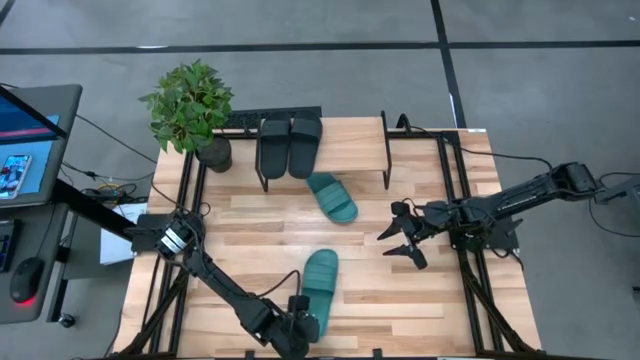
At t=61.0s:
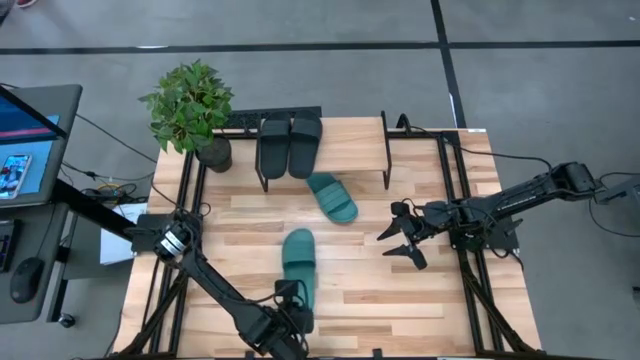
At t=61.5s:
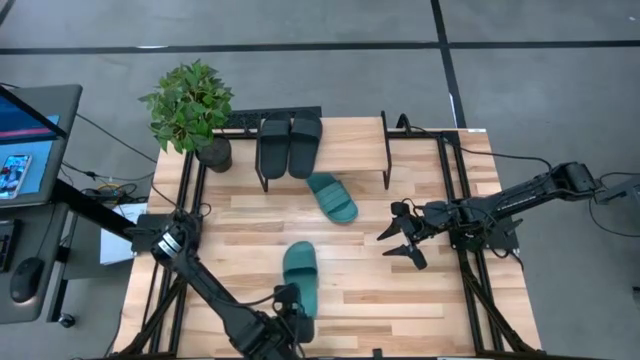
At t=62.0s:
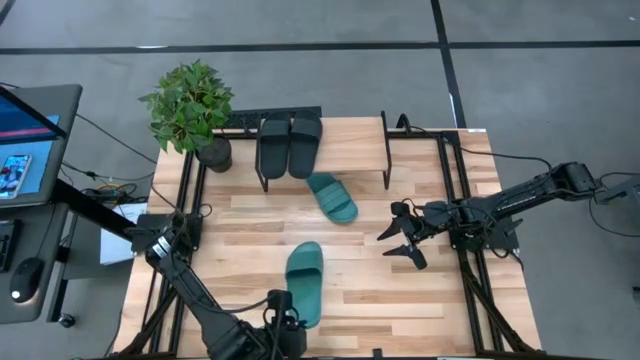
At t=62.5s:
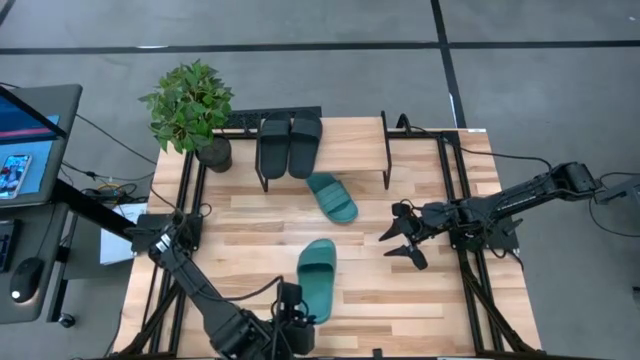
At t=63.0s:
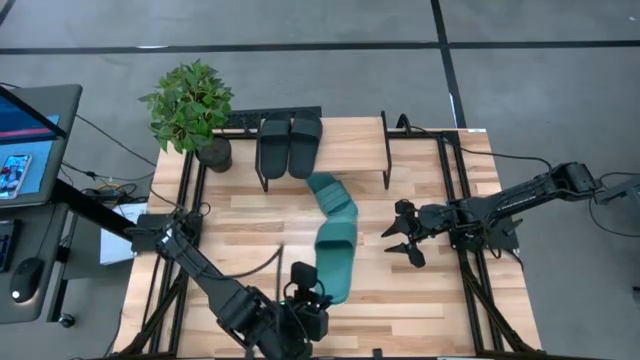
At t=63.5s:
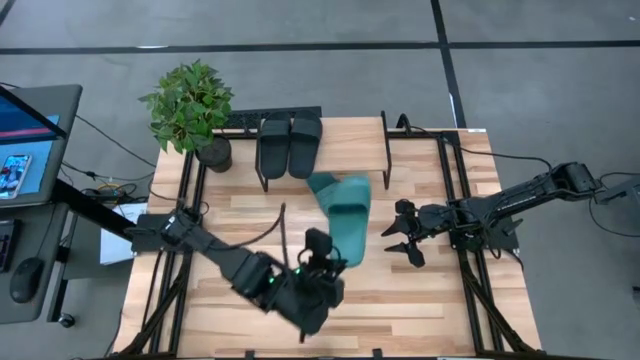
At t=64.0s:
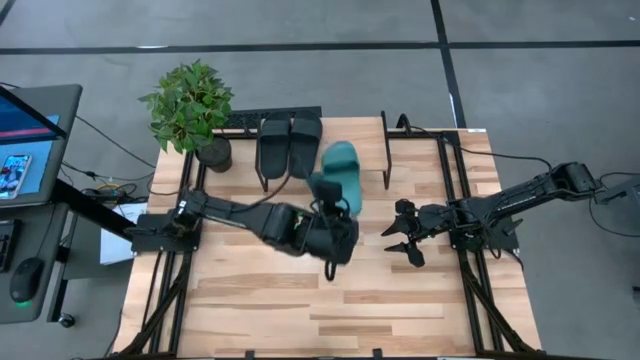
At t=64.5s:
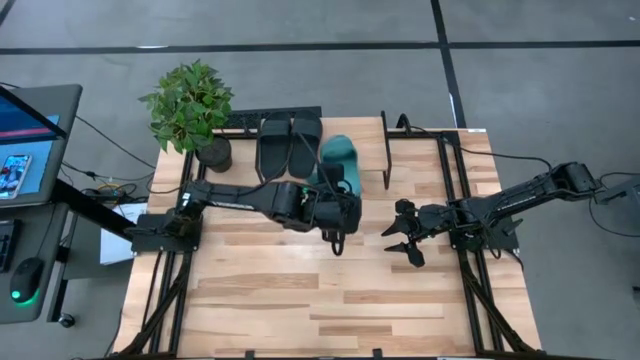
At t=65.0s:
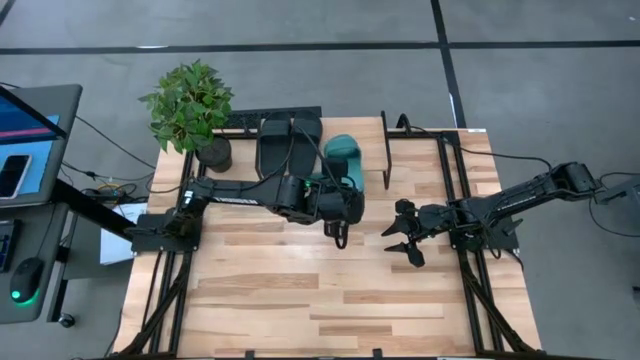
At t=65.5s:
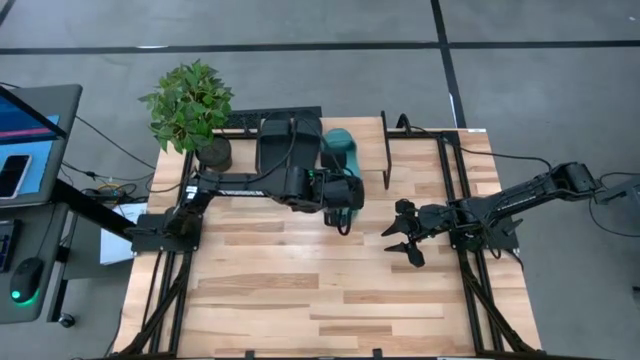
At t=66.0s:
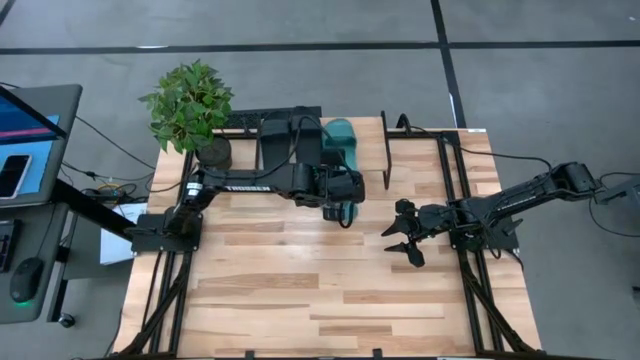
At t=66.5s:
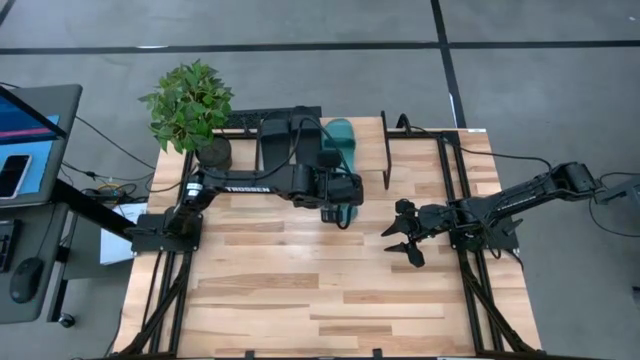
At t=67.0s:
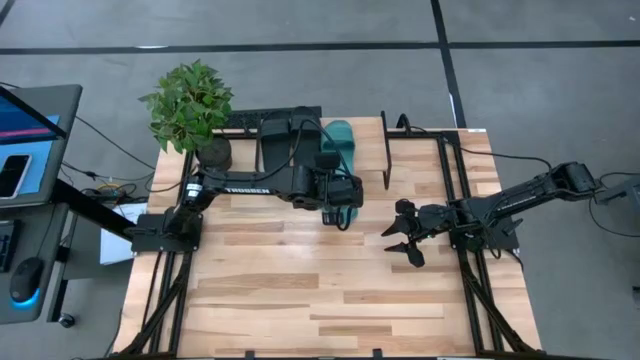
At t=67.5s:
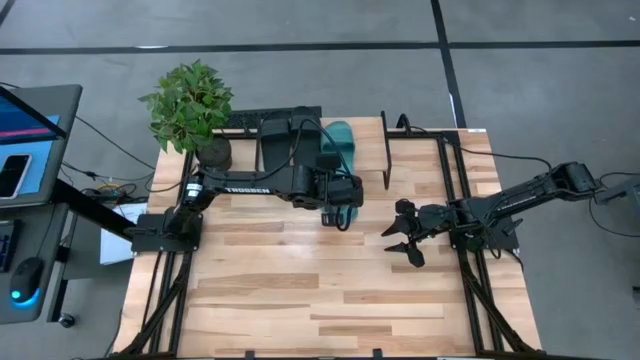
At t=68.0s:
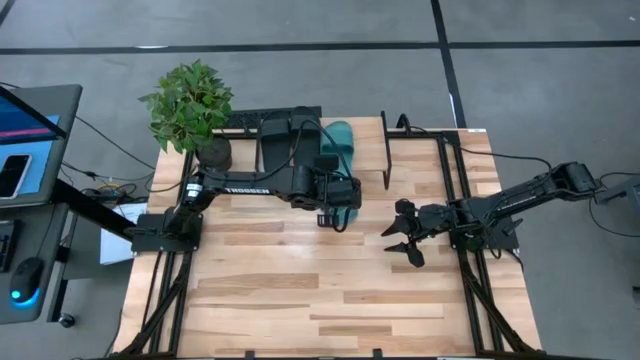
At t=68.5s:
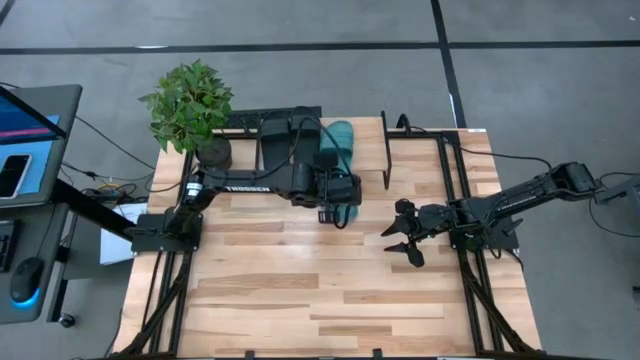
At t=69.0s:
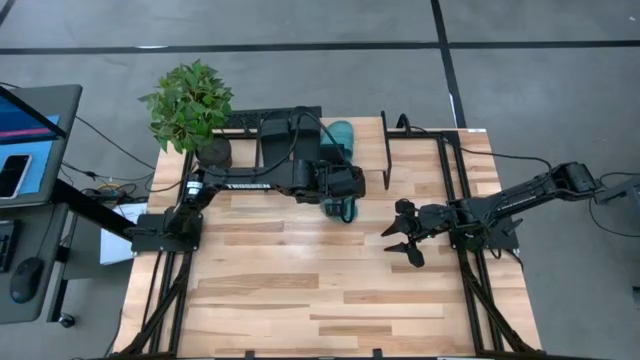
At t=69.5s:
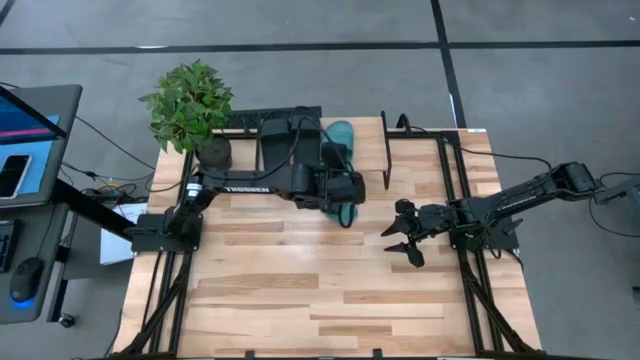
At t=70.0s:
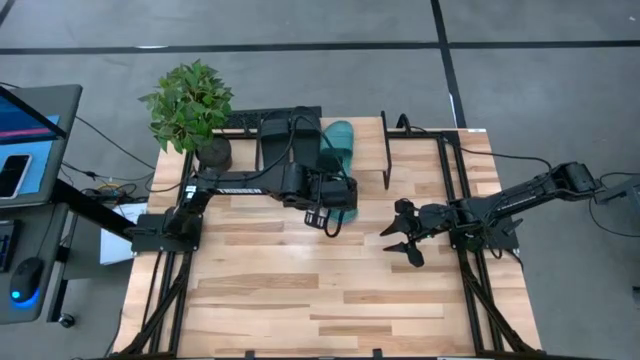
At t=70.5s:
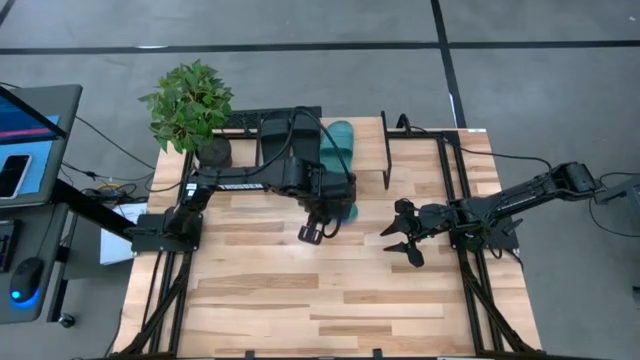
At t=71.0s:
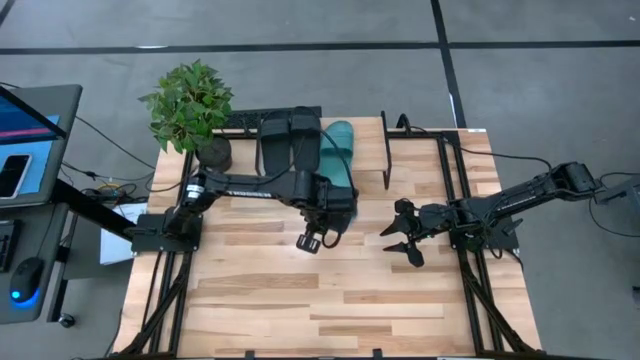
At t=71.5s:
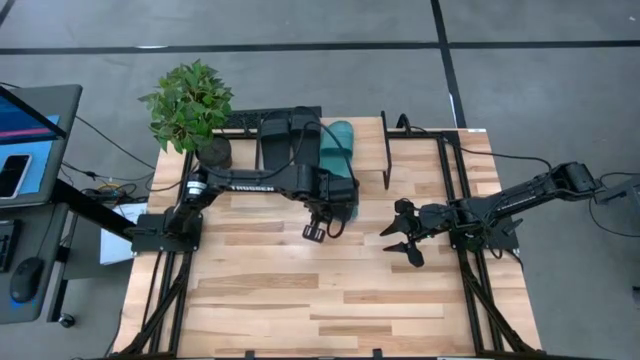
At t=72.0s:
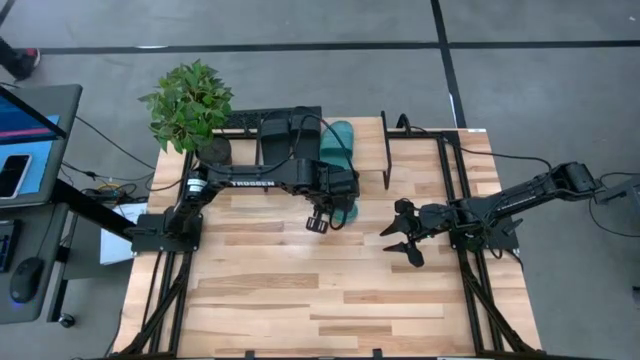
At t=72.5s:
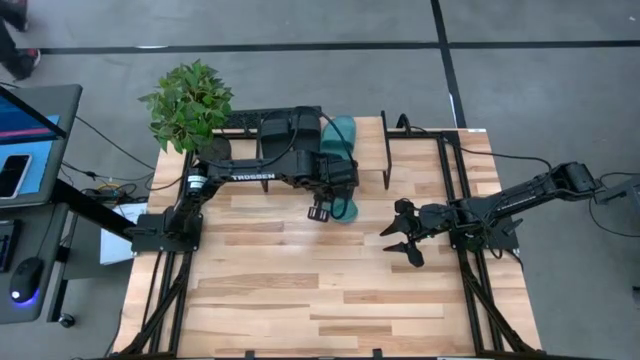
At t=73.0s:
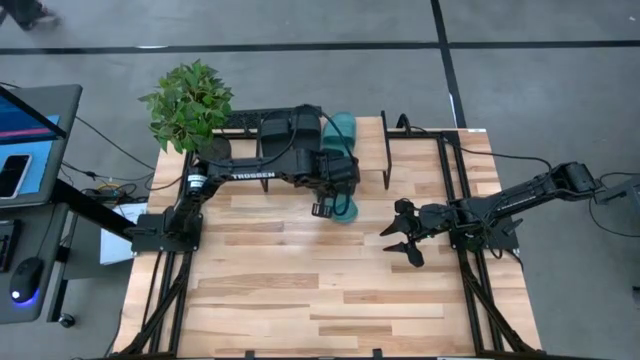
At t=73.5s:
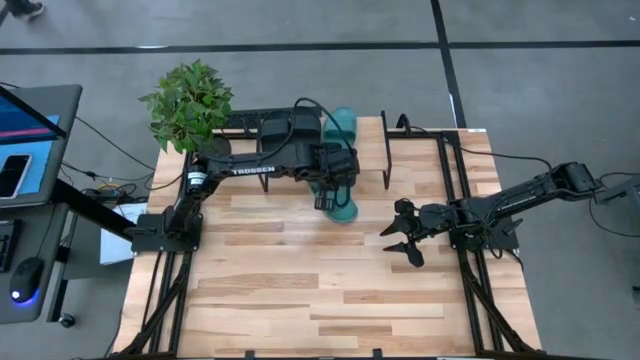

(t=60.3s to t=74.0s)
Task: Pick and place slides into the shelf
Put the bottom green pair of slippers on the shelf
